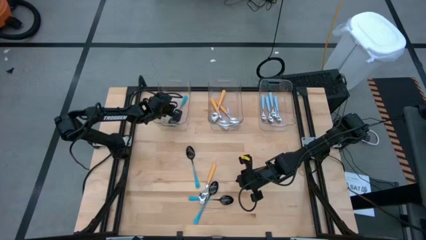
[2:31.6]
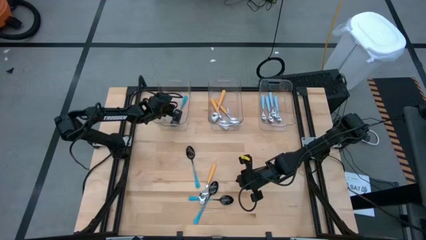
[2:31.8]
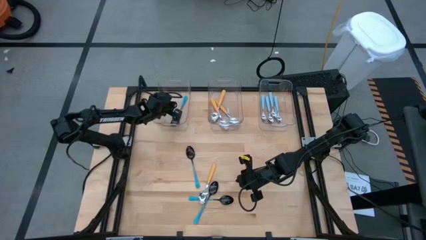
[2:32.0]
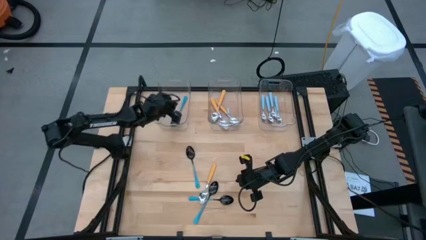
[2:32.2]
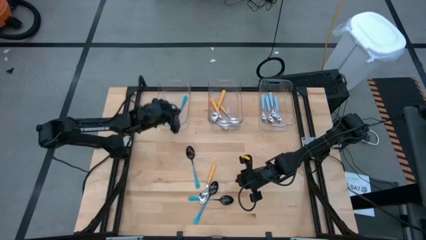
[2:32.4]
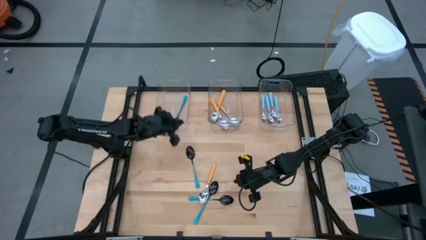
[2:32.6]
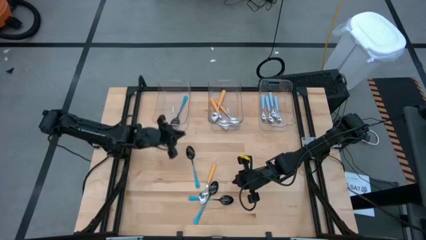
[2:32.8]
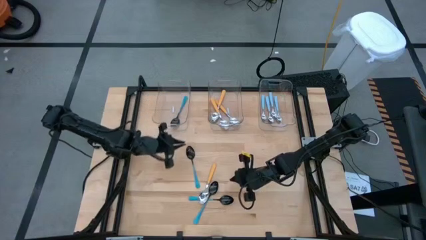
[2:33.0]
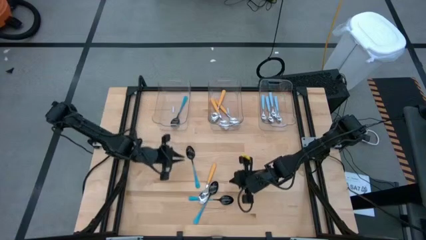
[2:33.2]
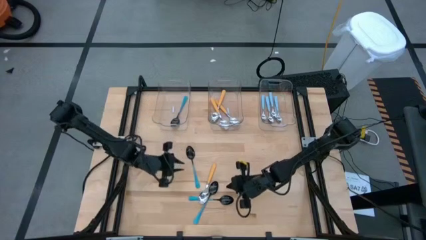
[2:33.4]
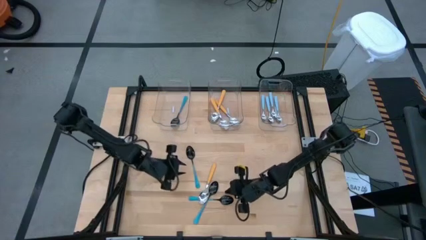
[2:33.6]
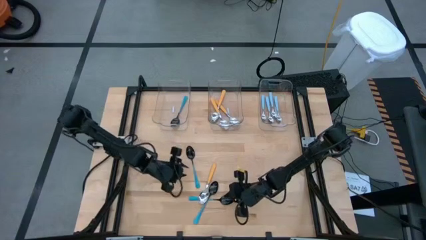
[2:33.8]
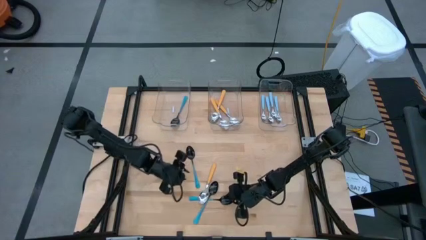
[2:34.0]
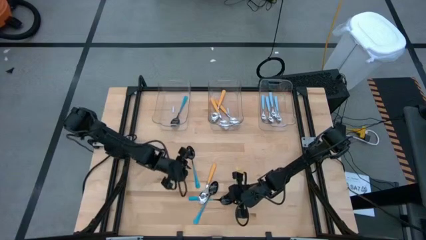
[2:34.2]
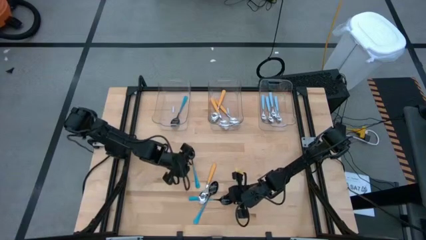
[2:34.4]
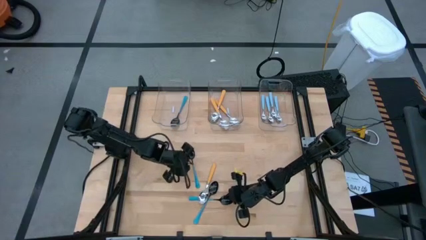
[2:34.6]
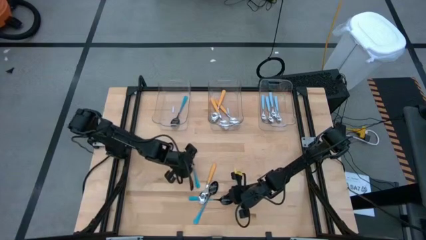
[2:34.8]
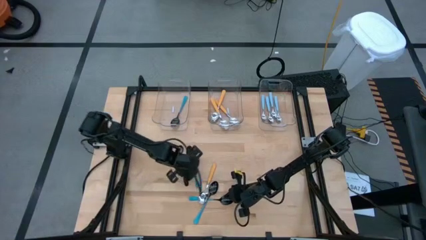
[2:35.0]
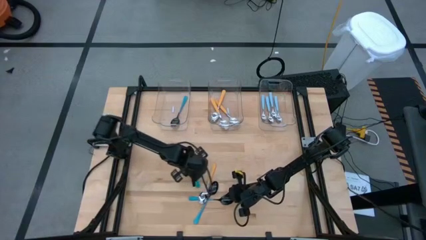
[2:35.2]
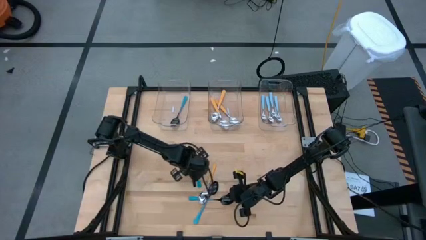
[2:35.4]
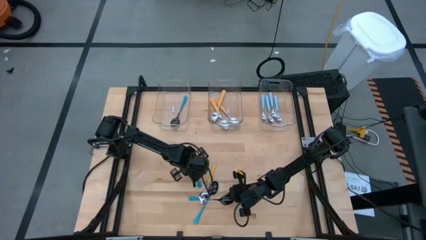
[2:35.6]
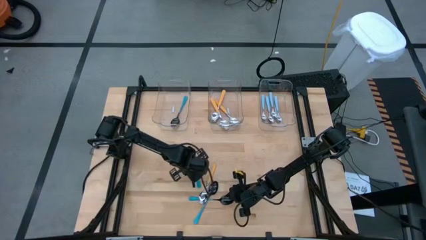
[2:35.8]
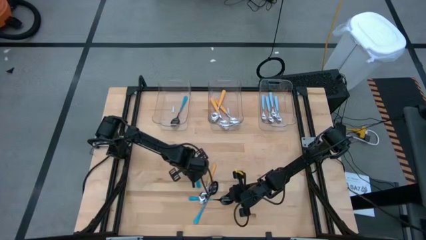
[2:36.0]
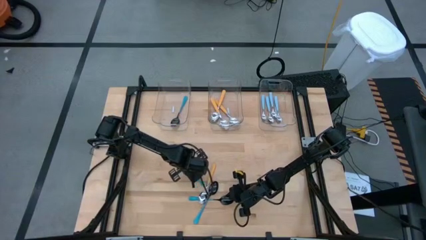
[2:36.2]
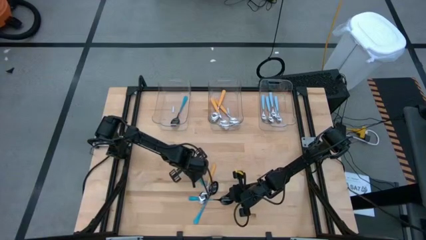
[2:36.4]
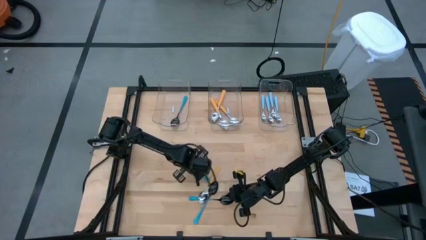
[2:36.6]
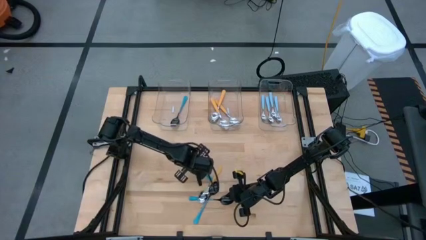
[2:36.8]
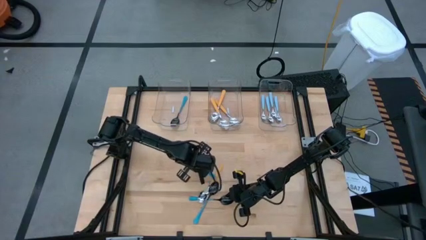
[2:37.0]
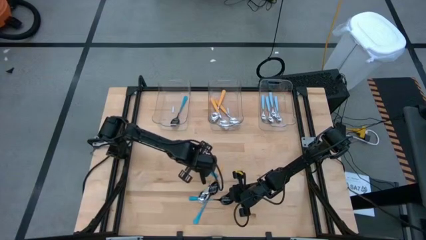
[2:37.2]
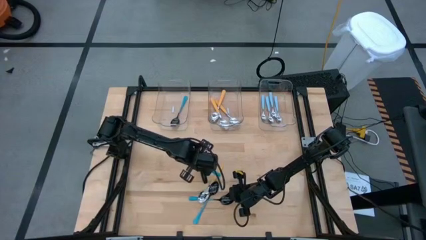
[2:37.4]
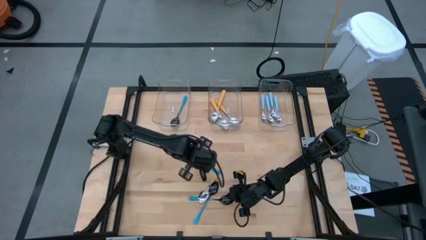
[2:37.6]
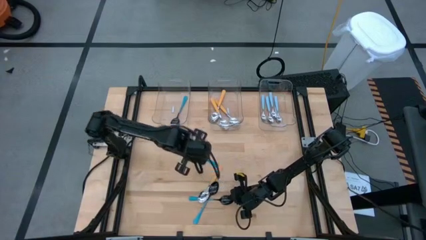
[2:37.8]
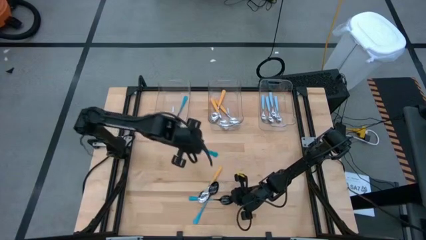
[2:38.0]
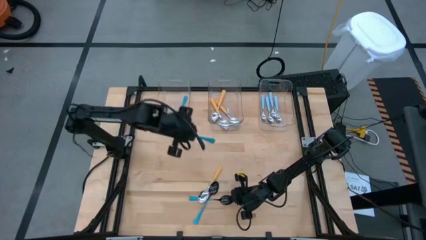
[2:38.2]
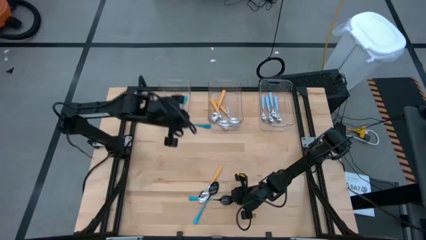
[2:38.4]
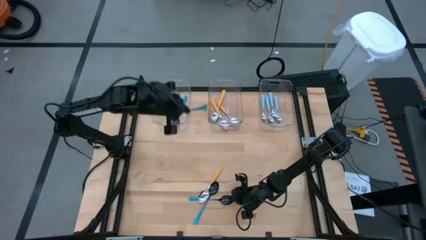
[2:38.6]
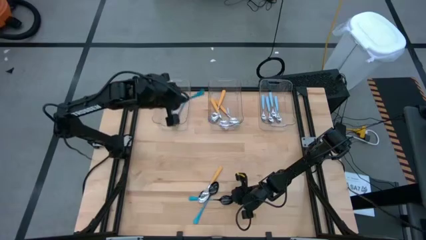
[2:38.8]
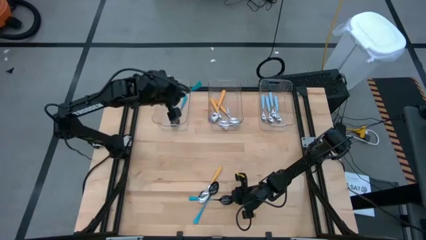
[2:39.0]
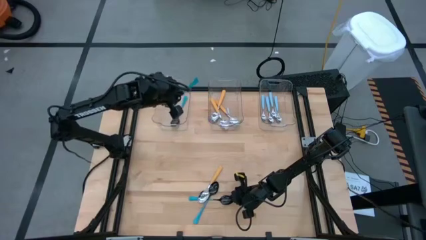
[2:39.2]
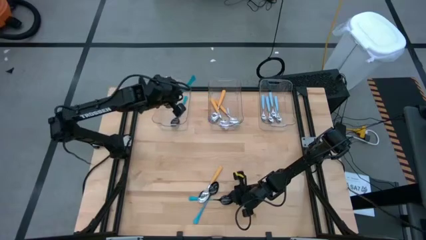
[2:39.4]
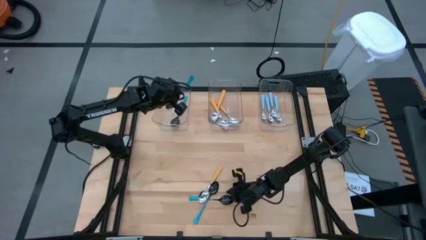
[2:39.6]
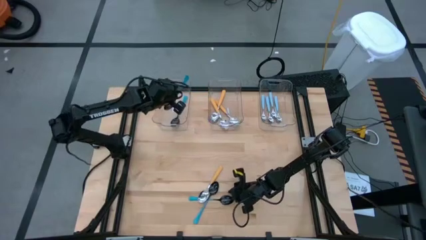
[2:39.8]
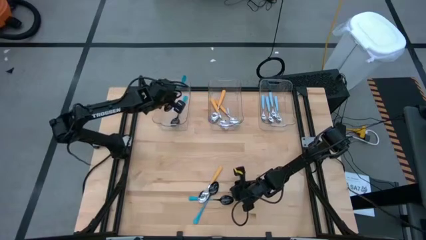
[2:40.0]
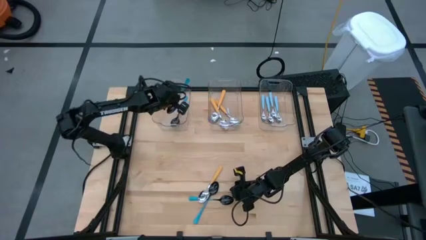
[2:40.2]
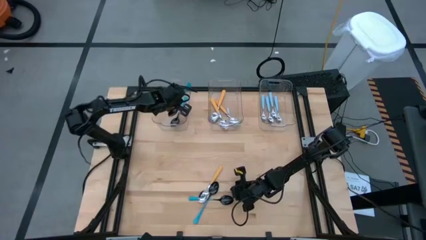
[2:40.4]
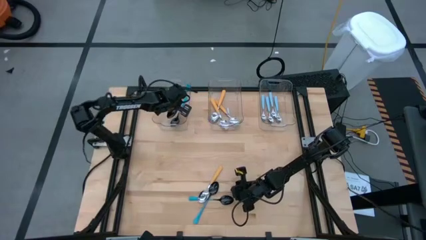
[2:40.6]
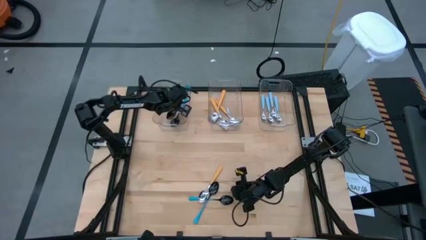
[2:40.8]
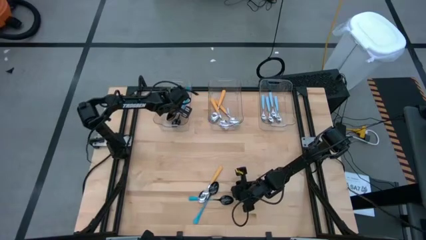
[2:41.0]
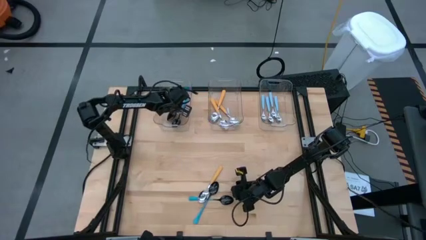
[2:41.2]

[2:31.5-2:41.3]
Task: Sort silverware by color (type)
Put the blue spoon into the left transparent bin

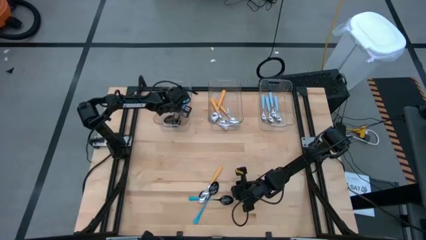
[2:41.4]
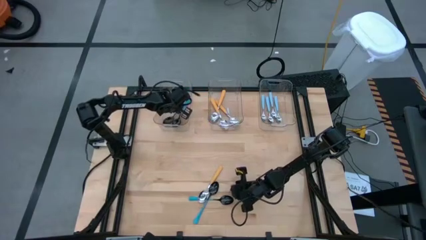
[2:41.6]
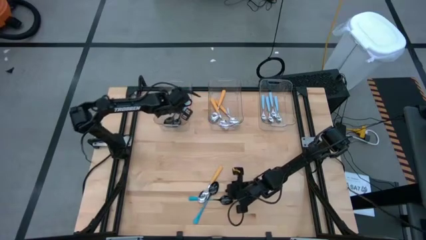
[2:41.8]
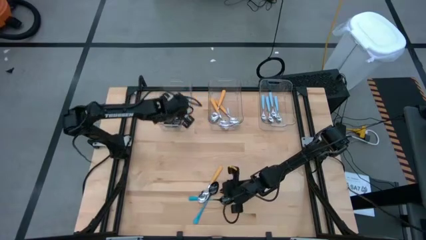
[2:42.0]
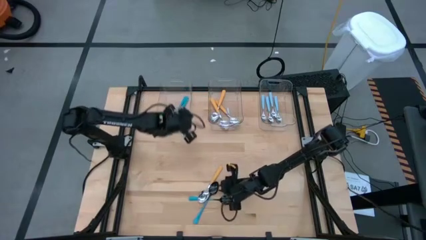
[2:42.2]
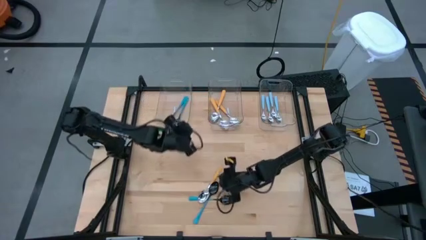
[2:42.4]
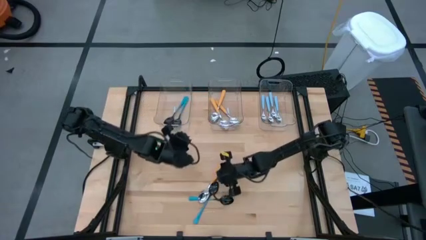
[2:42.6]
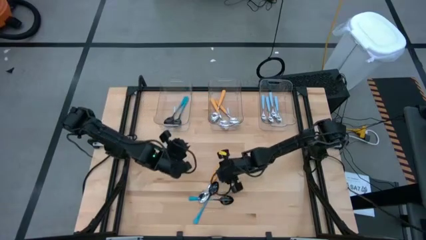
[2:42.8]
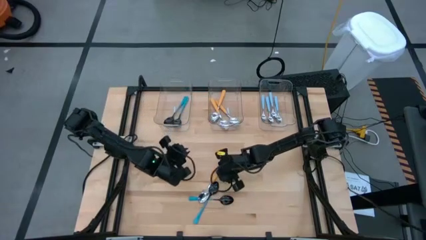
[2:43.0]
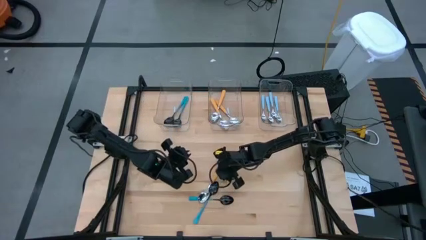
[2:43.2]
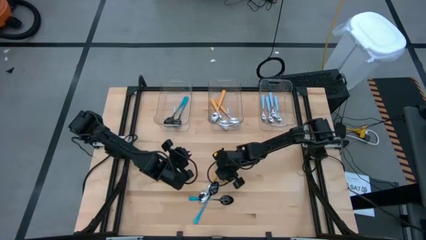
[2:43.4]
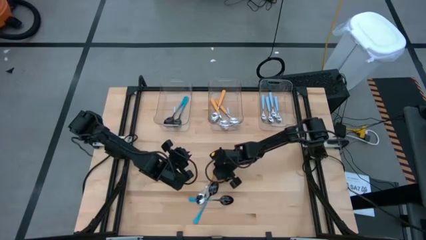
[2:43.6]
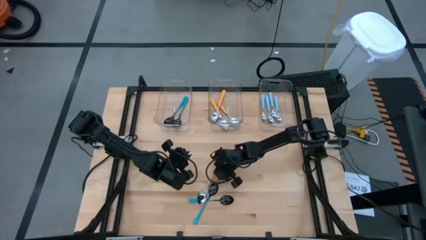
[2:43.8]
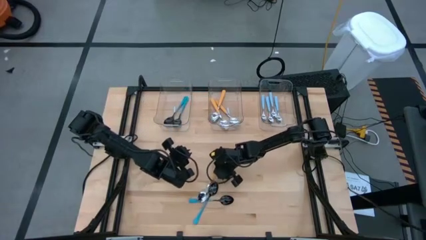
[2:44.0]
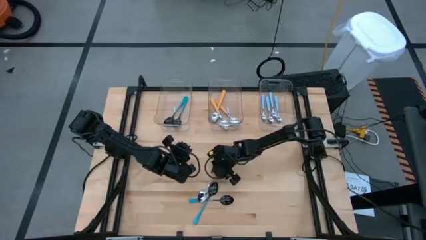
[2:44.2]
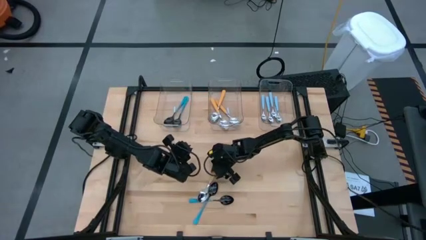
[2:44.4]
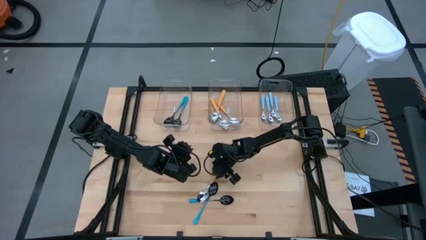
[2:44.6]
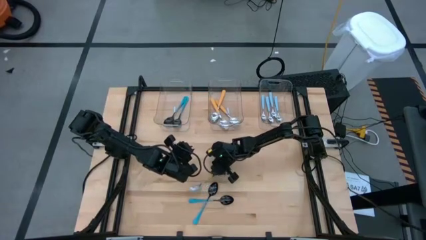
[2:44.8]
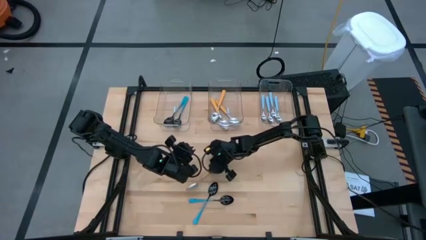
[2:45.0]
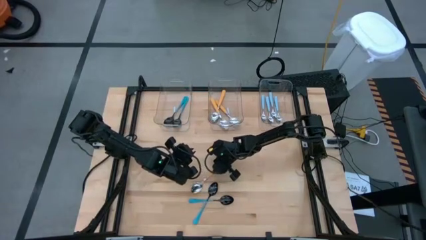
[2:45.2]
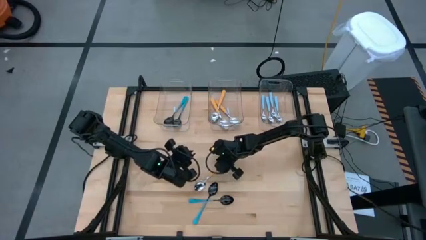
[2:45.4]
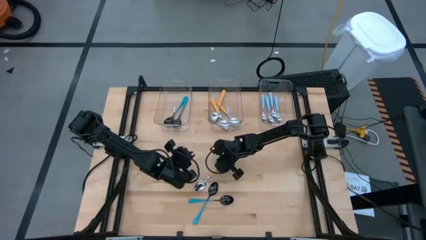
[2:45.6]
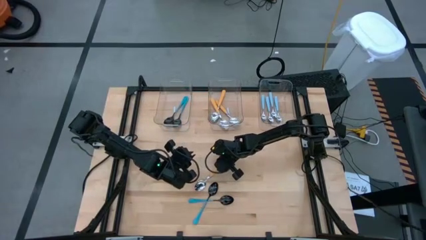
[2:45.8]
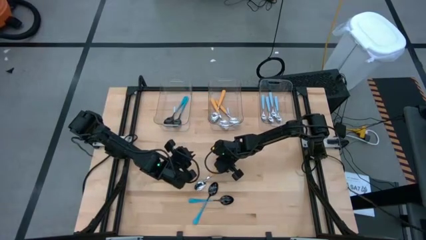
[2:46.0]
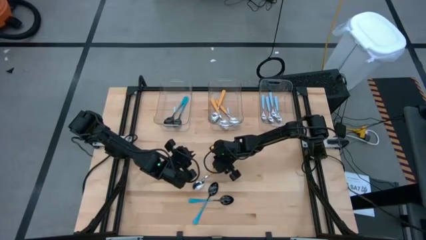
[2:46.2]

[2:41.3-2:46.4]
Put the brown spoon into the middle transparent bin

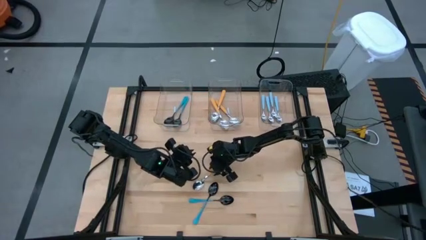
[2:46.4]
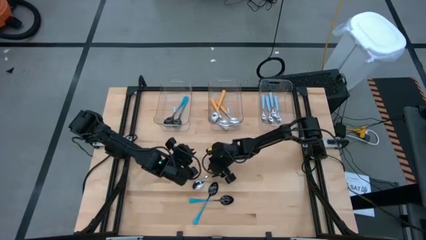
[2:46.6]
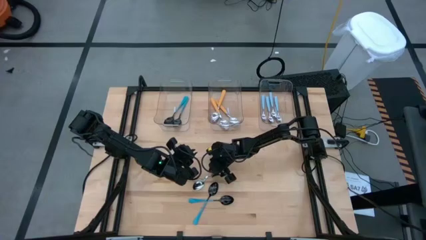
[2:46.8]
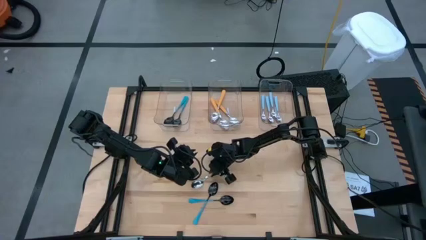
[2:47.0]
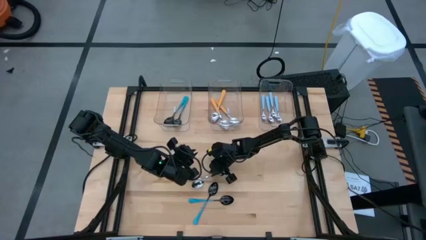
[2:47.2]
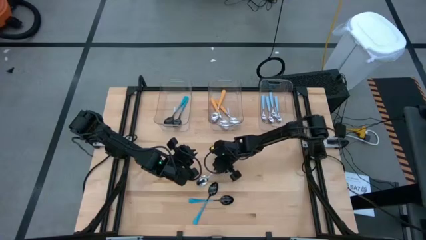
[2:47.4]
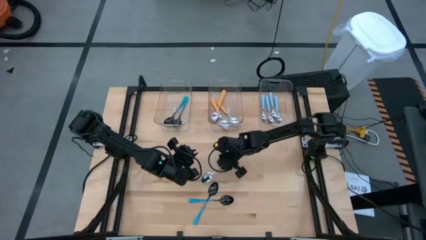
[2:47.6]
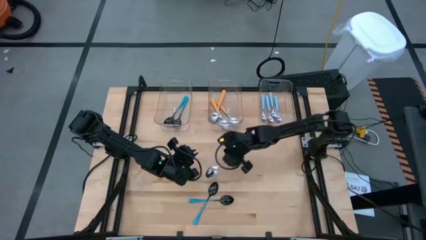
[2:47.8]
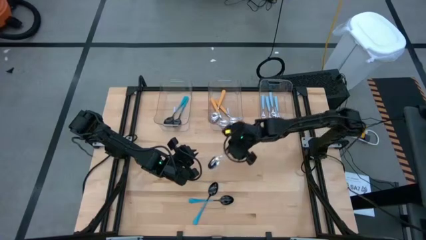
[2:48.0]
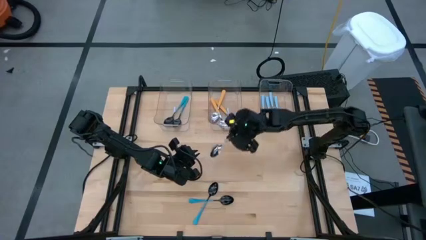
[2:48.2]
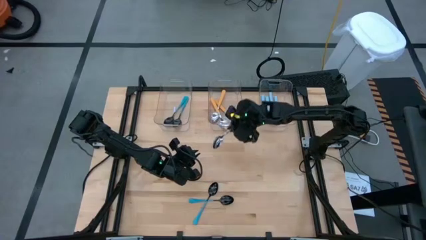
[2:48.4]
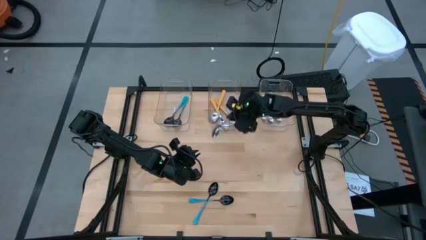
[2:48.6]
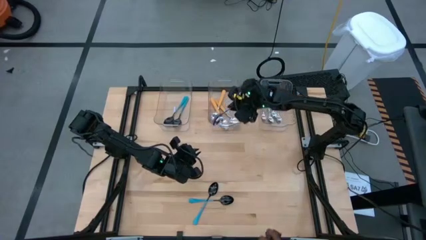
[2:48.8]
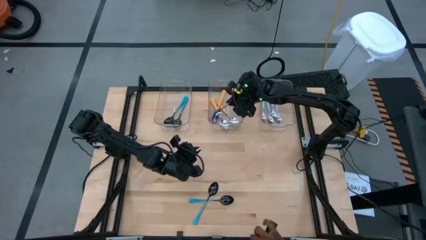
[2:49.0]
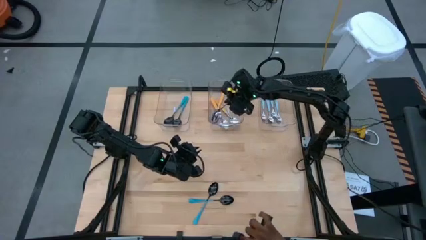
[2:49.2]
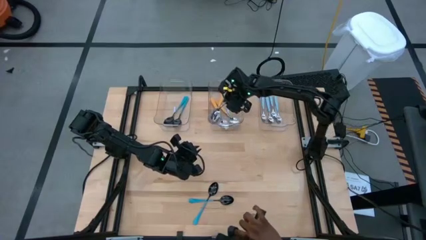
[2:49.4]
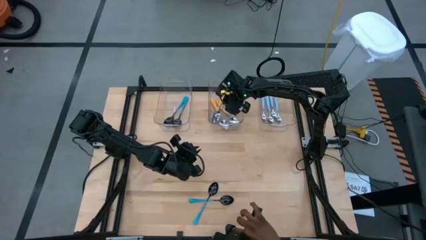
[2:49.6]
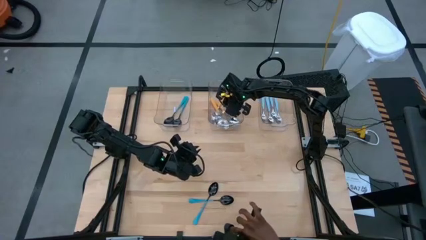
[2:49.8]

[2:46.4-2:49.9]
Put the brown spoon into the middle transparent bin
